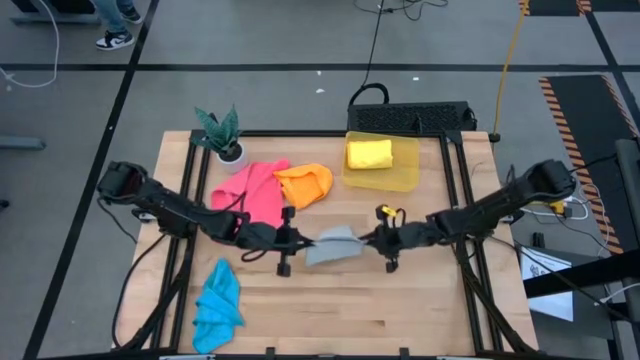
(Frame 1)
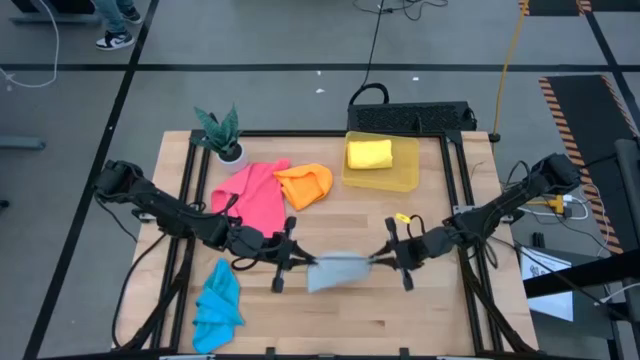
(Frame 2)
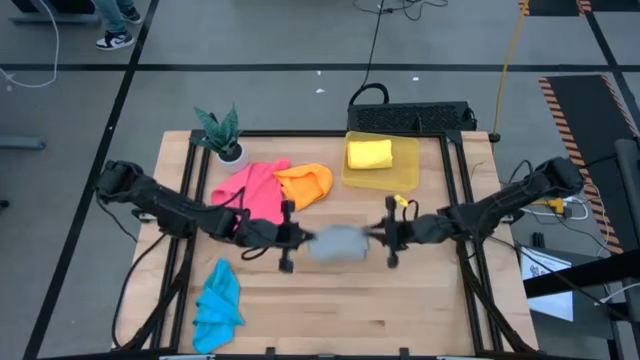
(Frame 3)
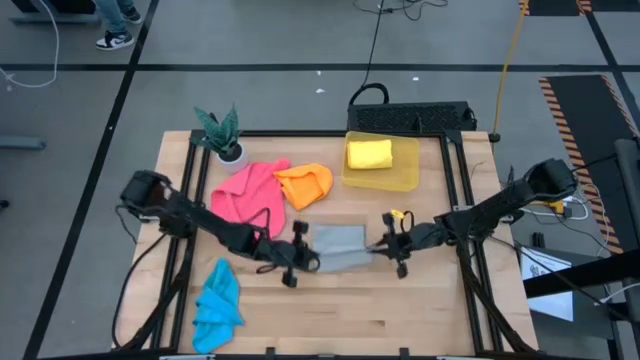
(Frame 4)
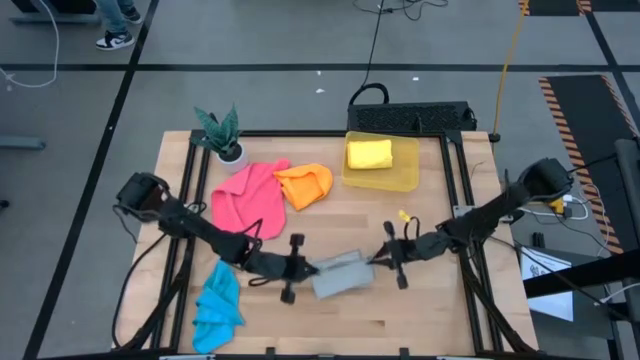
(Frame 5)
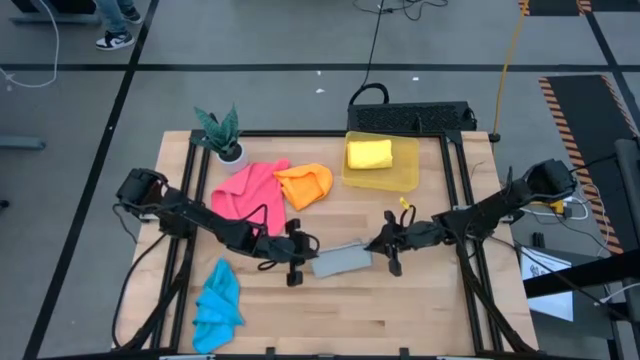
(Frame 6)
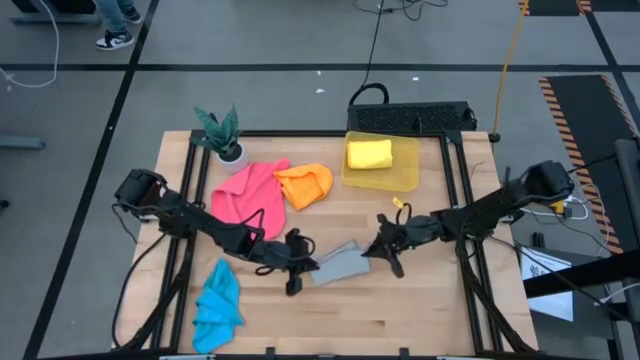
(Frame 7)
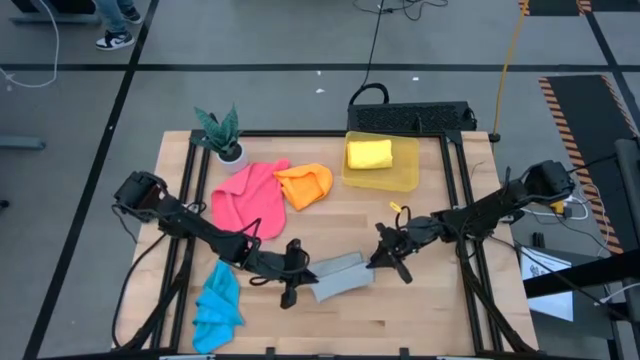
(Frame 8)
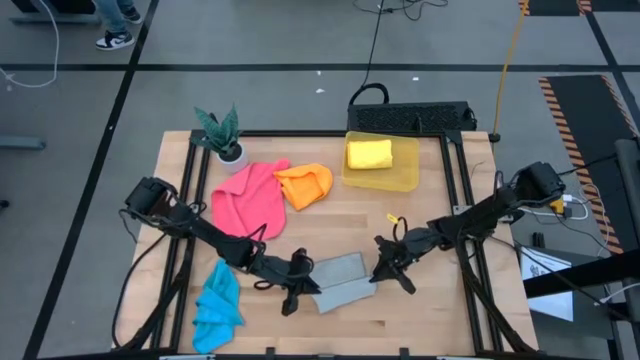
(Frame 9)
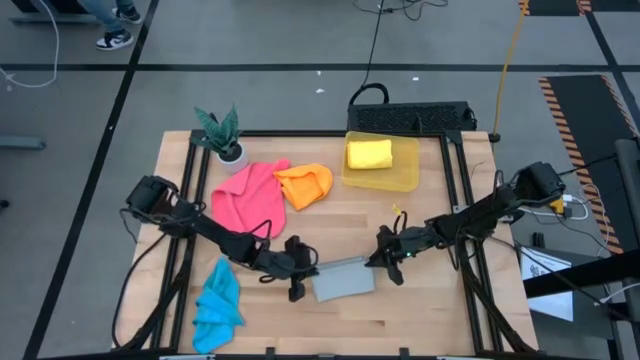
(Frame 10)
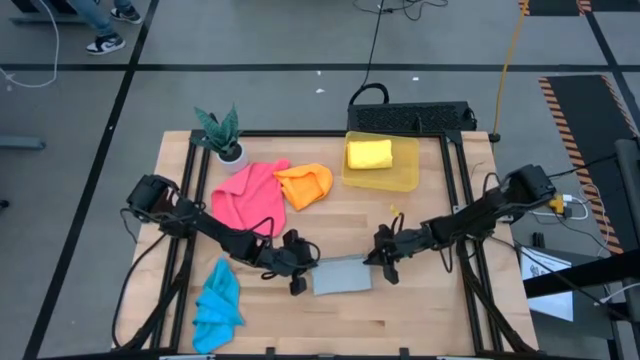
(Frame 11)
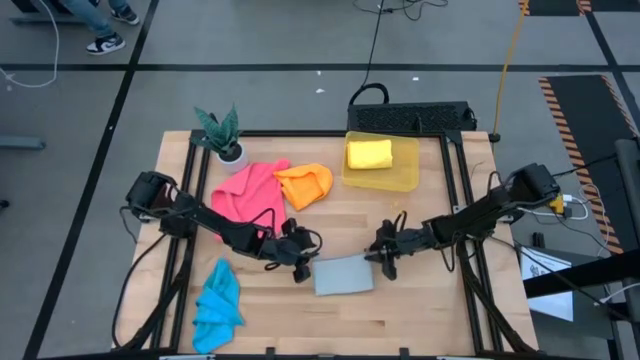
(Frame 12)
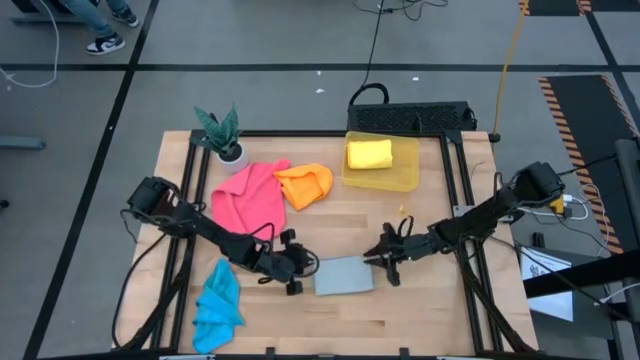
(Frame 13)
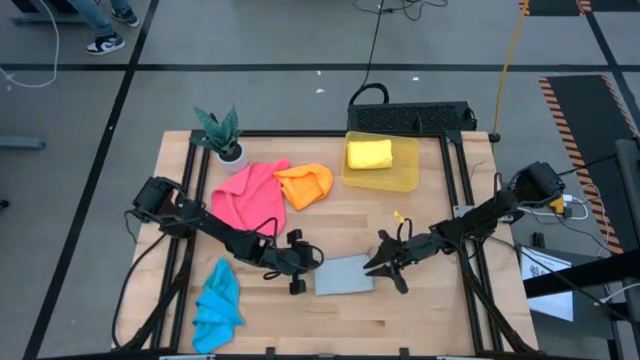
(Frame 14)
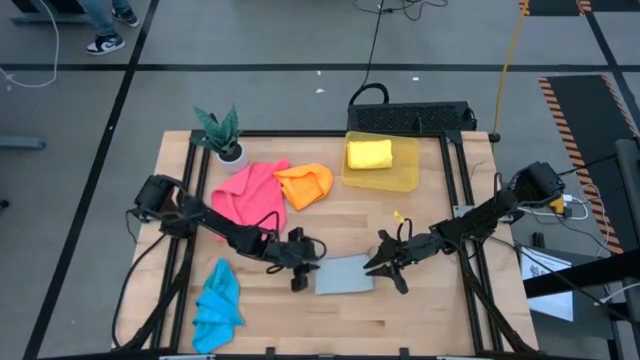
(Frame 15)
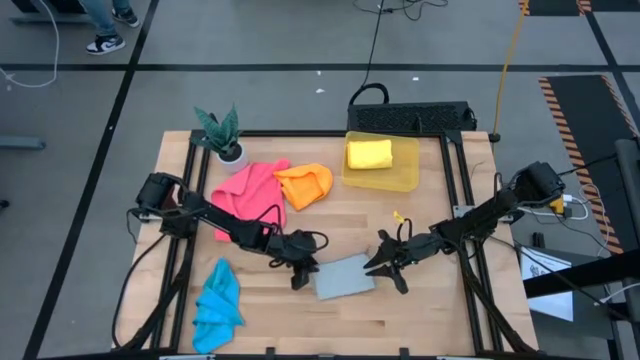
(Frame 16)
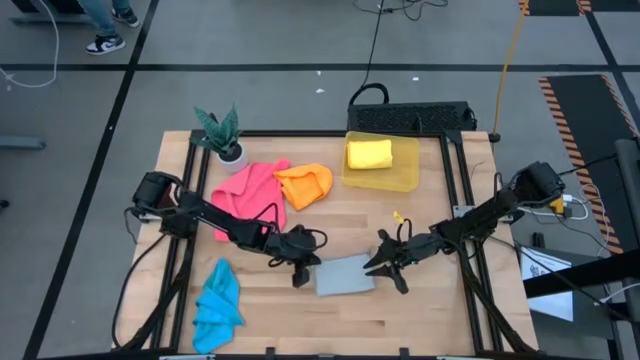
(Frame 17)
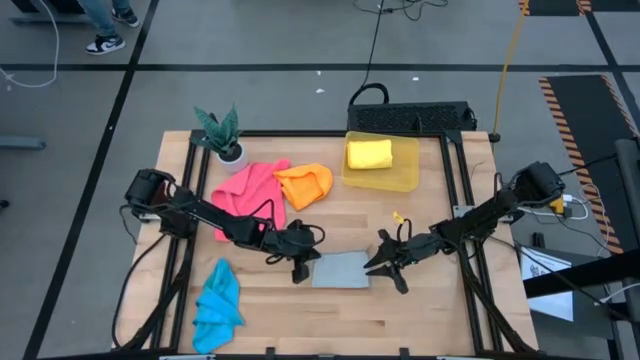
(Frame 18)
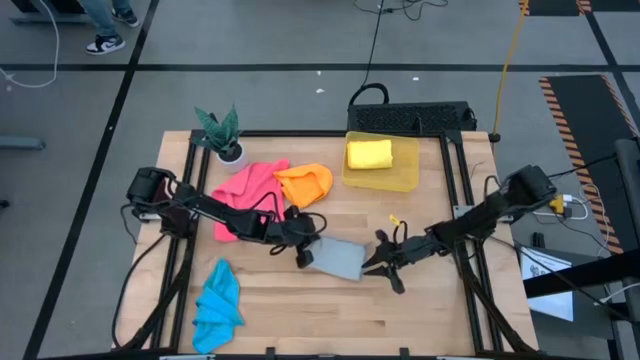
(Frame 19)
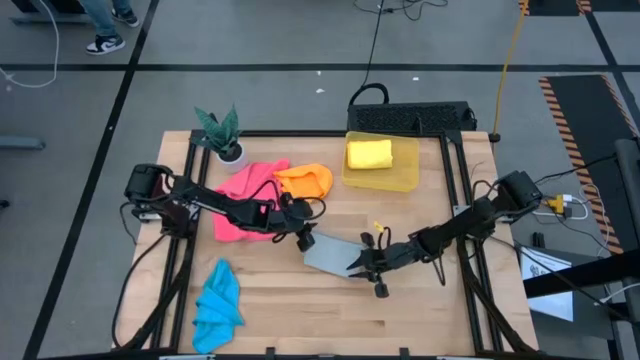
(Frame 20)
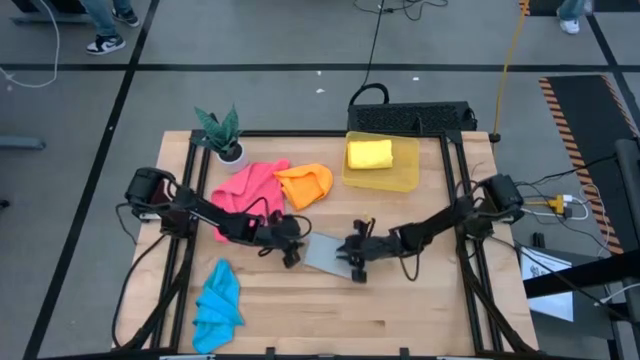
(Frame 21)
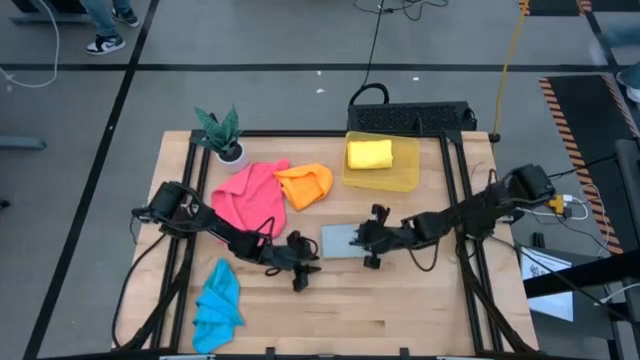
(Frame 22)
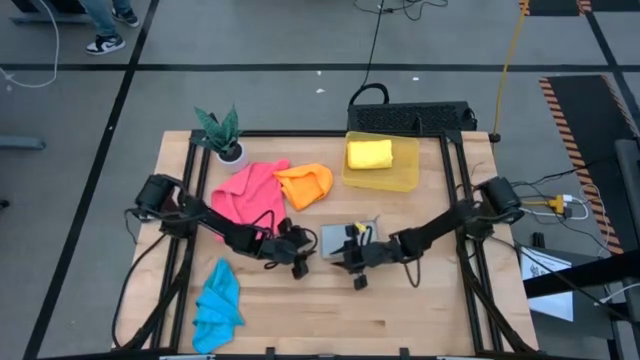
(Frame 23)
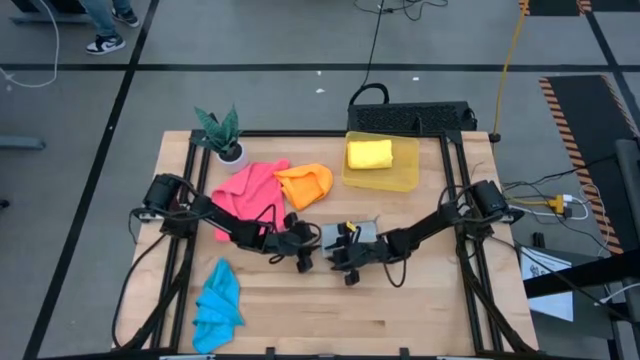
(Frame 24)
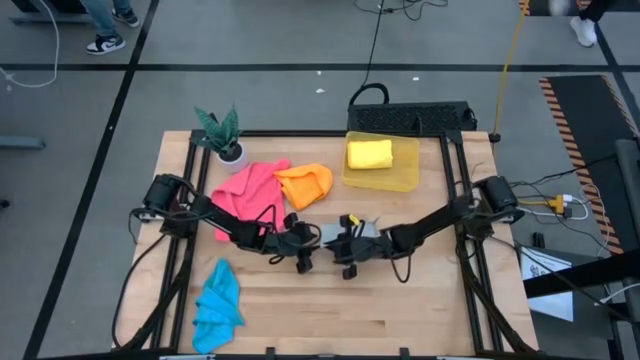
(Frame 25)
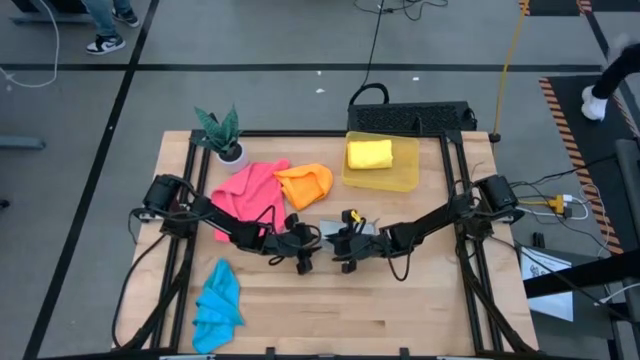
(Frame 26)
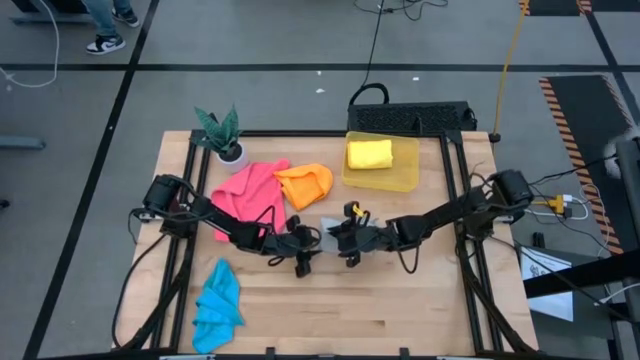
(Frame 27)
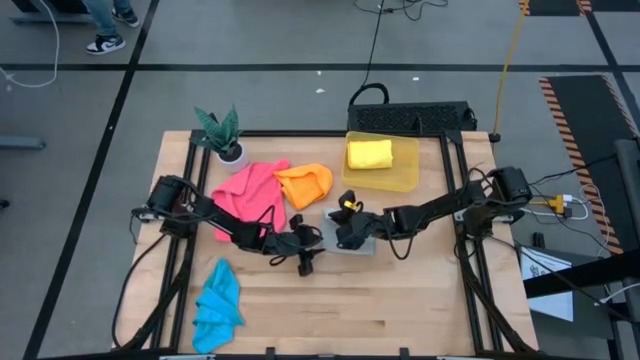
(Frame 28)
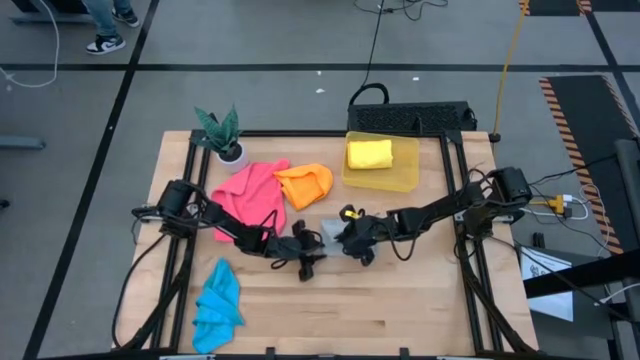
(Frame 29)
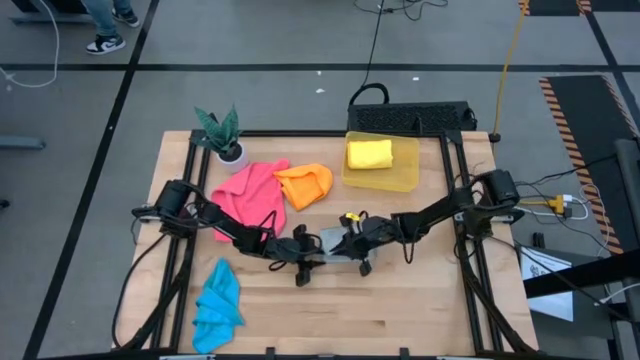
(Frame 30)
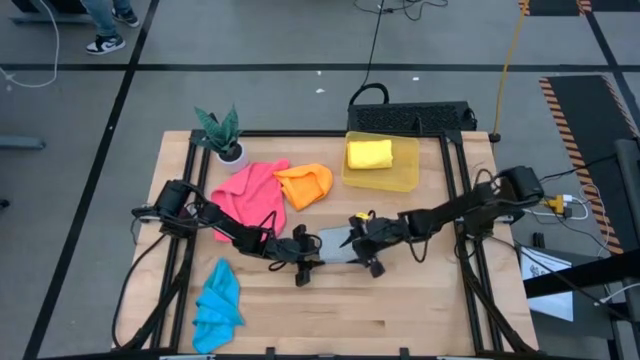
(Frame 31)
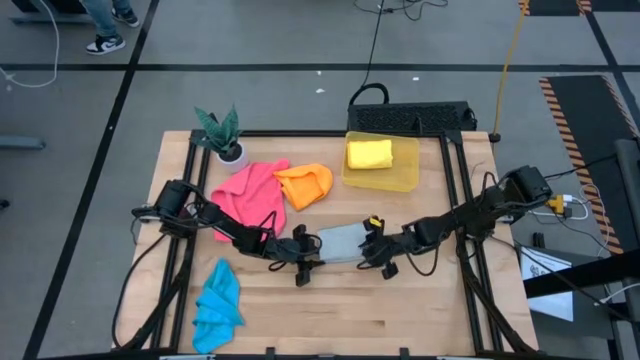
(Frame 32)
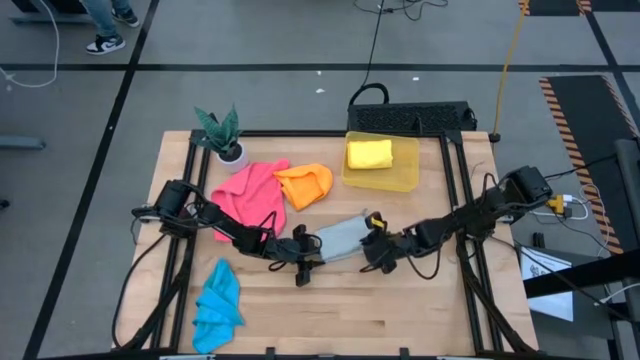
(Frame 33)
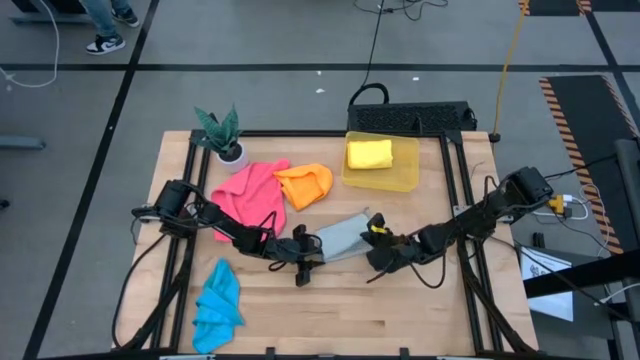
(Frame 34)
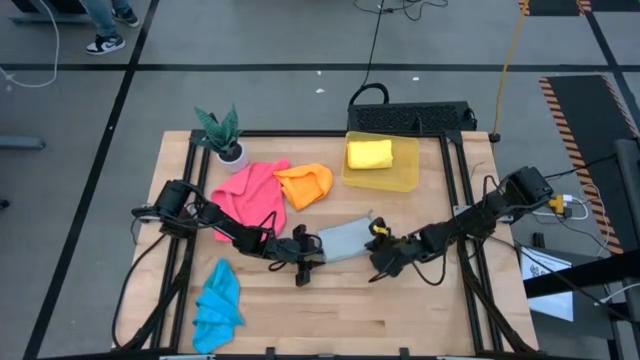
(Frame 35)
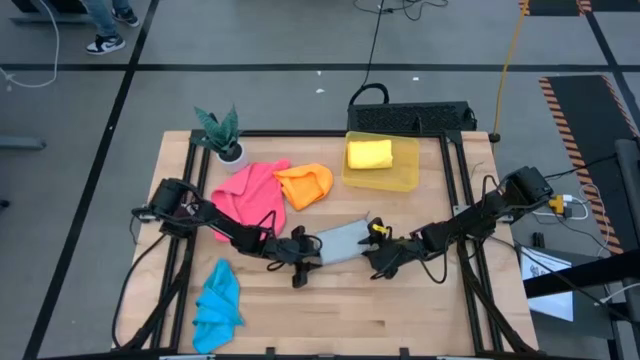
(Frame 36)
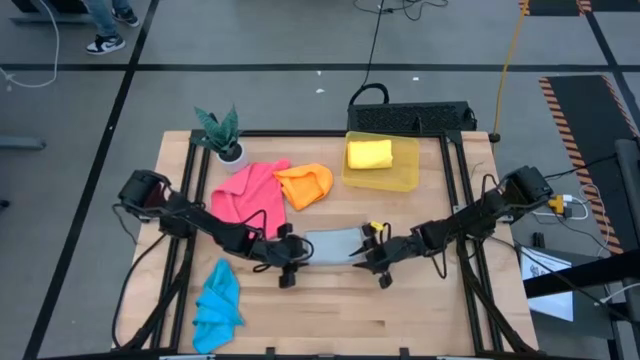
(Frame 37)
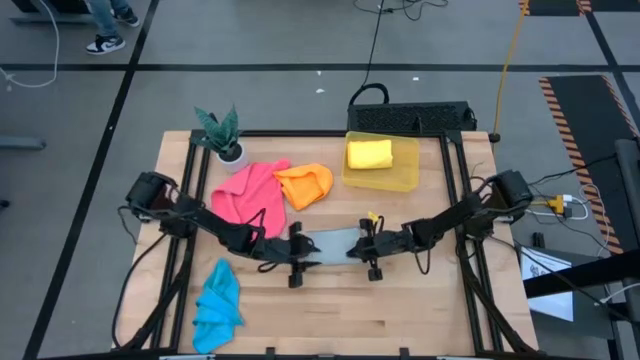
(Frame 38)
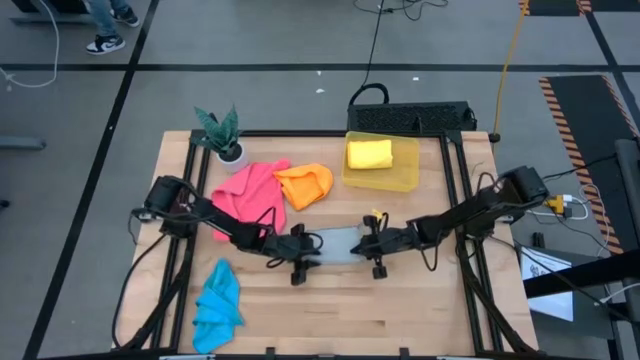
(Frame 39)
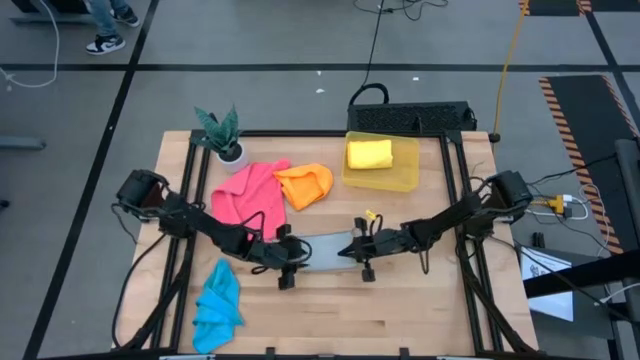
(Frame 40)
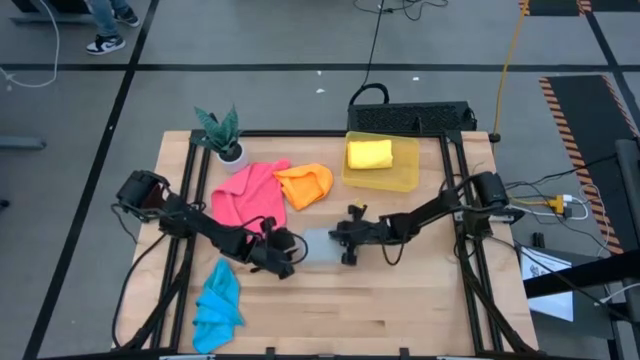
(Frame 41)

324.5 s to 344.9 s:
Task: Fold microfiber towels
Fold the gray kitchen towel
